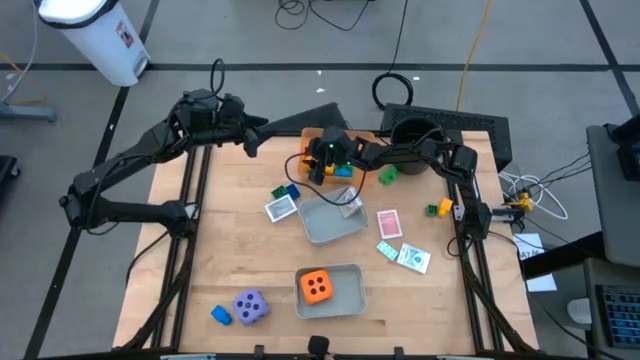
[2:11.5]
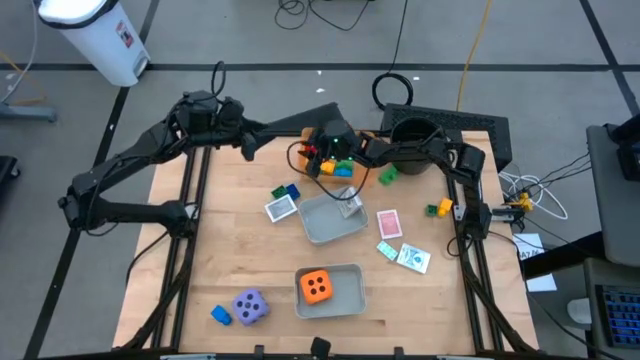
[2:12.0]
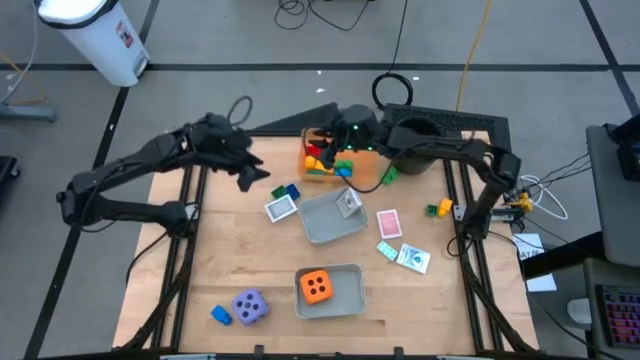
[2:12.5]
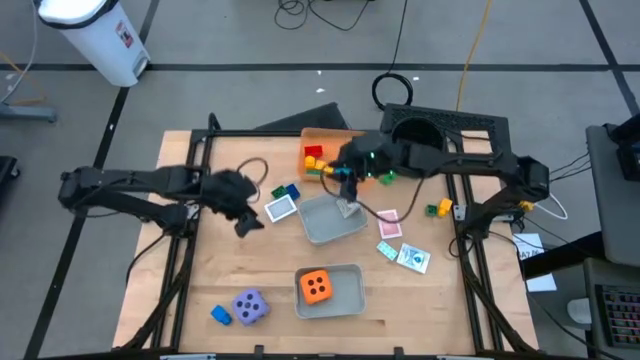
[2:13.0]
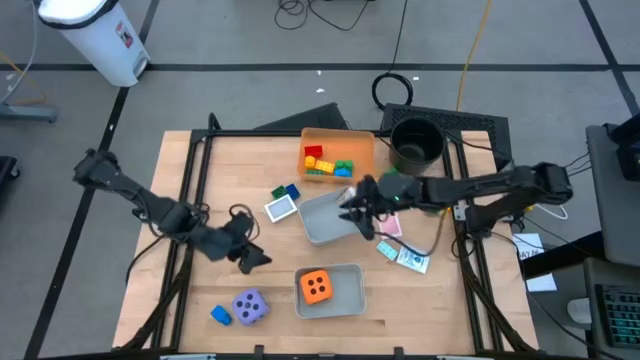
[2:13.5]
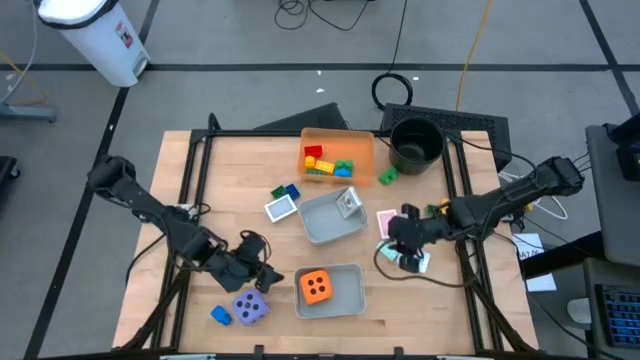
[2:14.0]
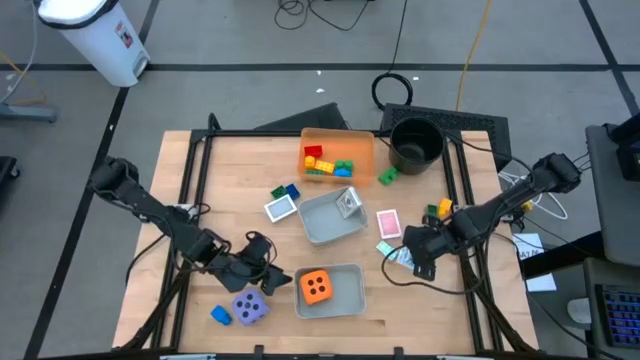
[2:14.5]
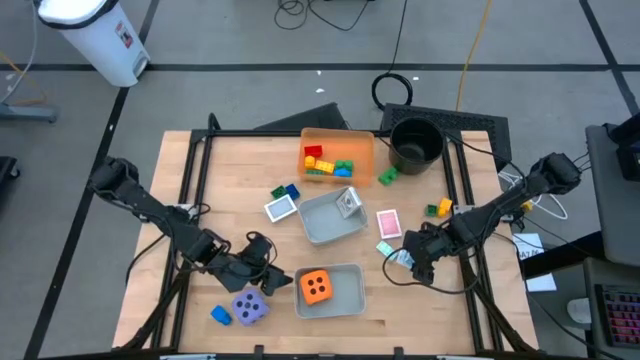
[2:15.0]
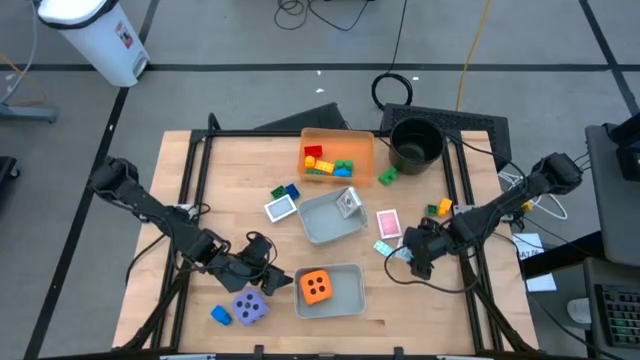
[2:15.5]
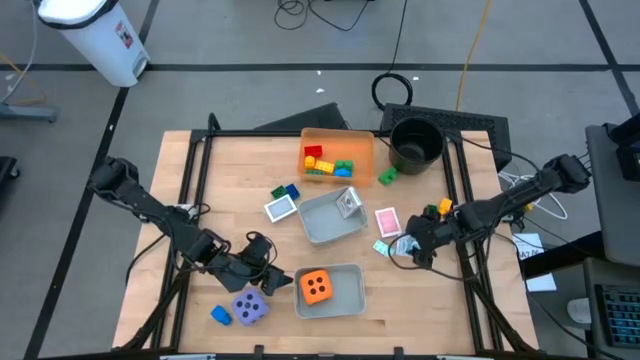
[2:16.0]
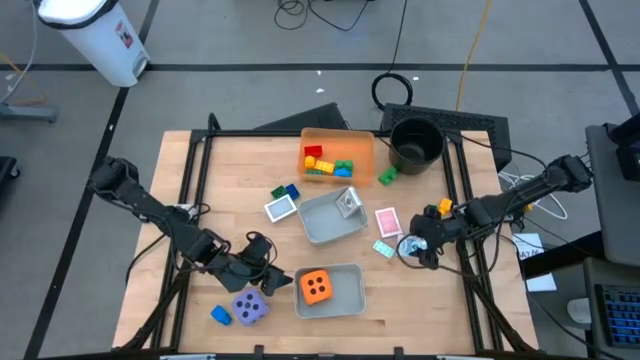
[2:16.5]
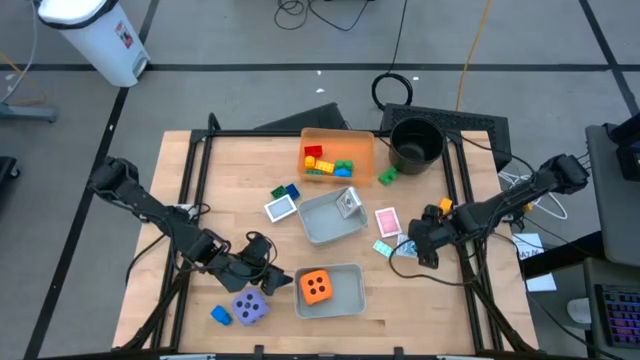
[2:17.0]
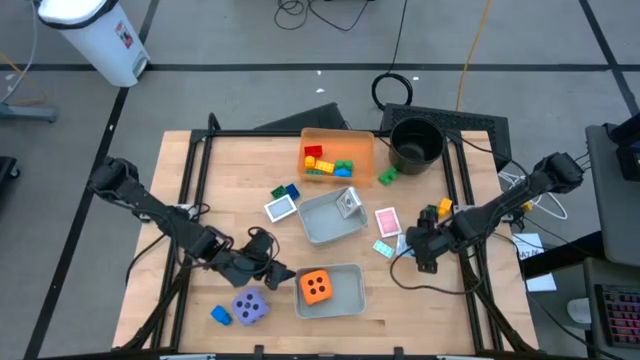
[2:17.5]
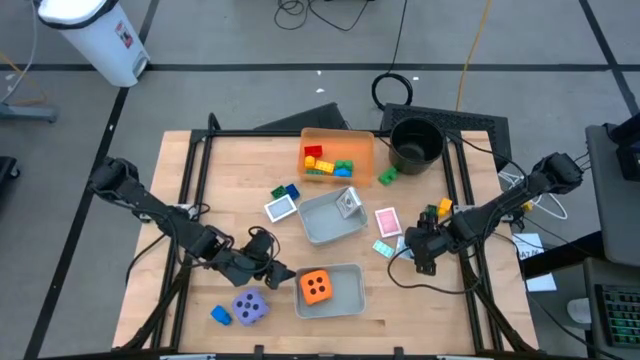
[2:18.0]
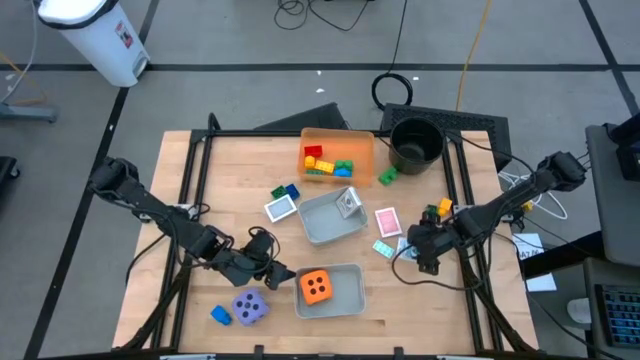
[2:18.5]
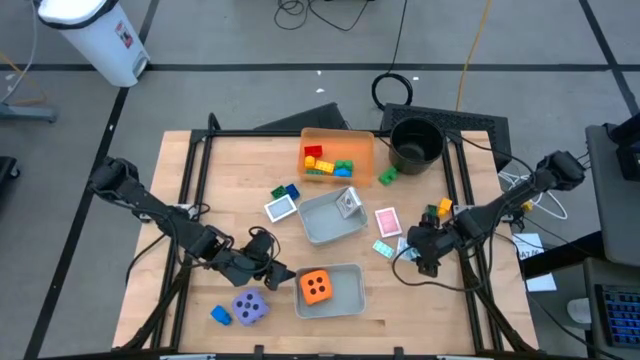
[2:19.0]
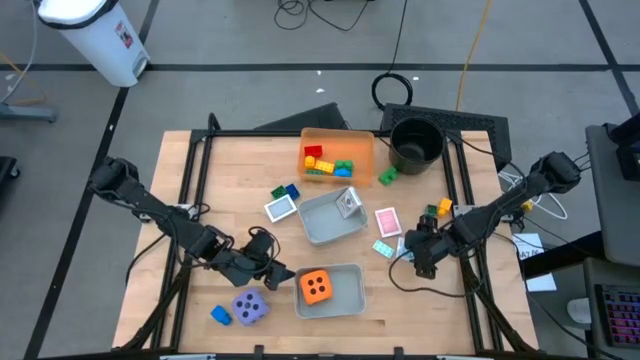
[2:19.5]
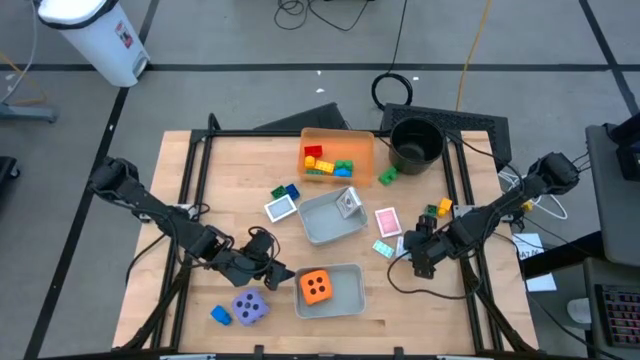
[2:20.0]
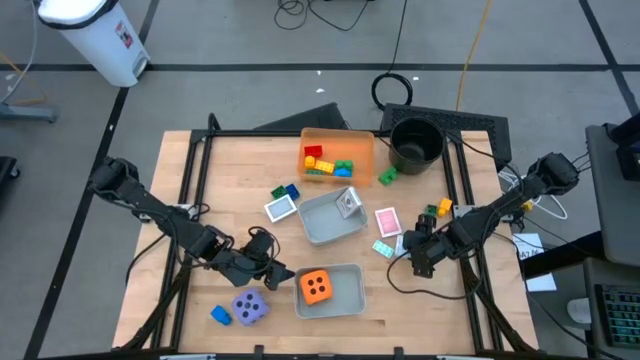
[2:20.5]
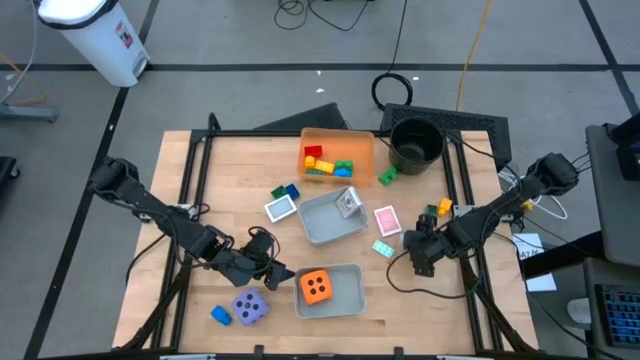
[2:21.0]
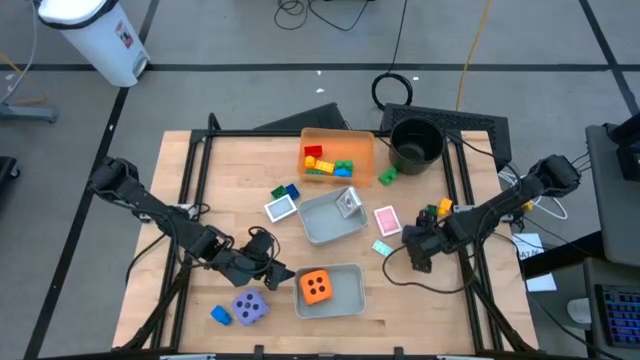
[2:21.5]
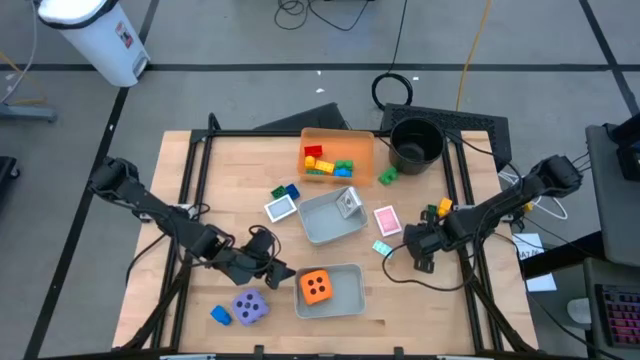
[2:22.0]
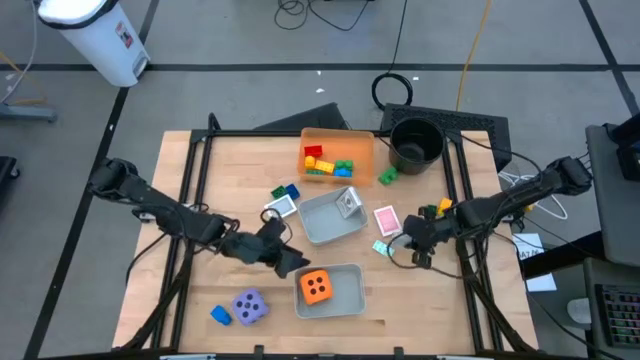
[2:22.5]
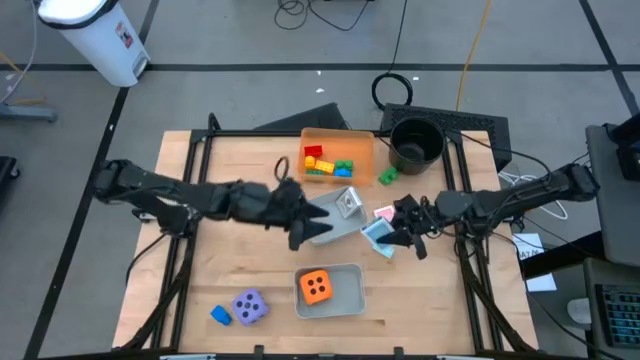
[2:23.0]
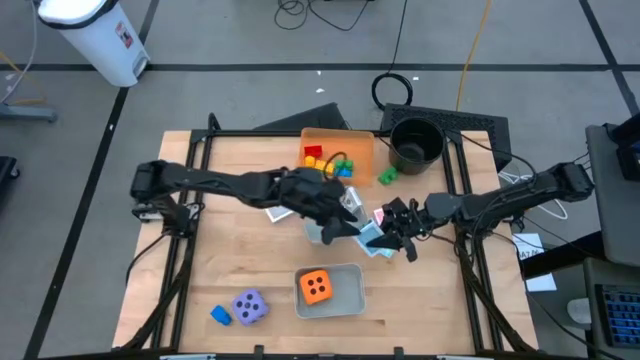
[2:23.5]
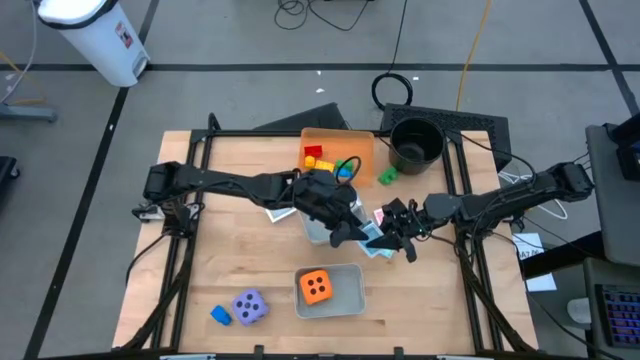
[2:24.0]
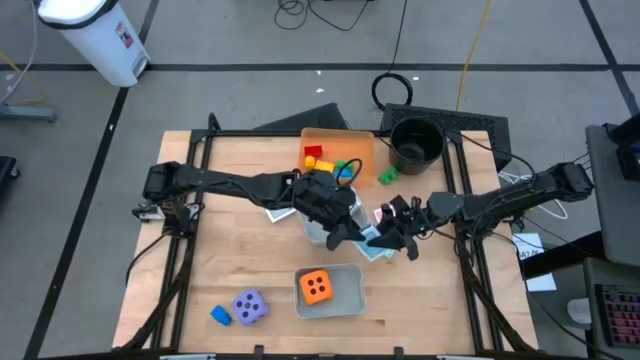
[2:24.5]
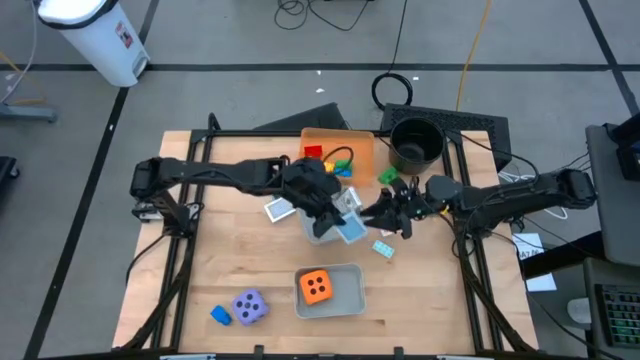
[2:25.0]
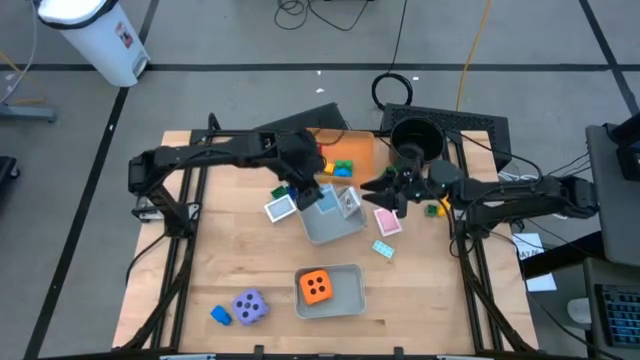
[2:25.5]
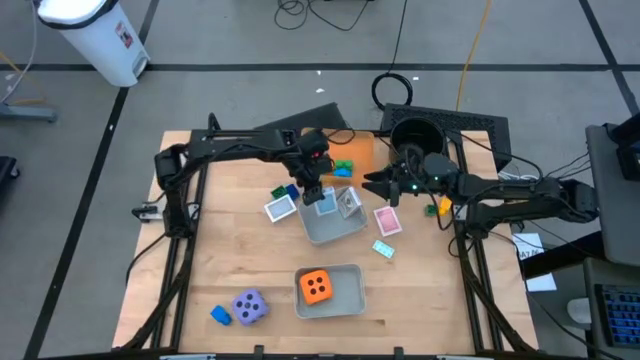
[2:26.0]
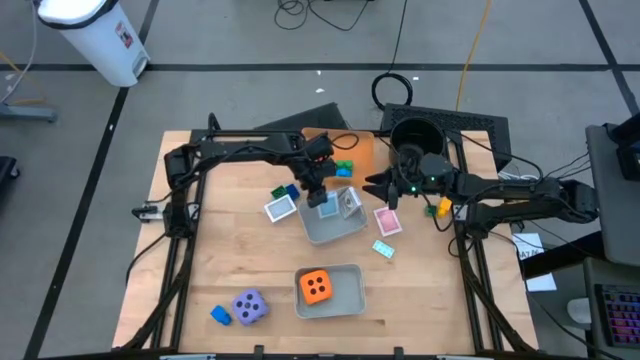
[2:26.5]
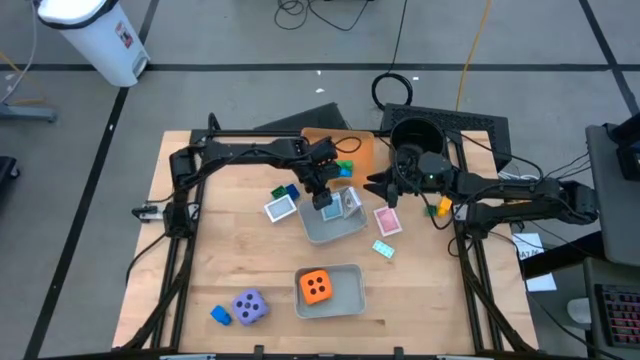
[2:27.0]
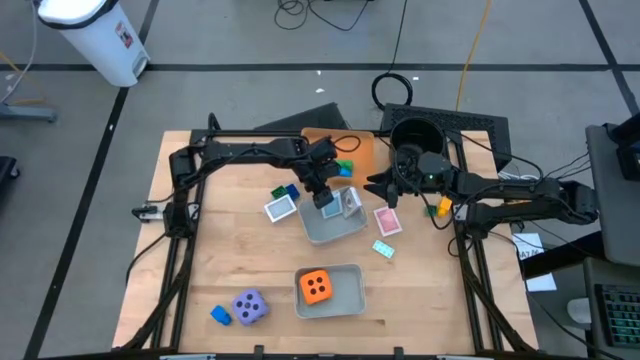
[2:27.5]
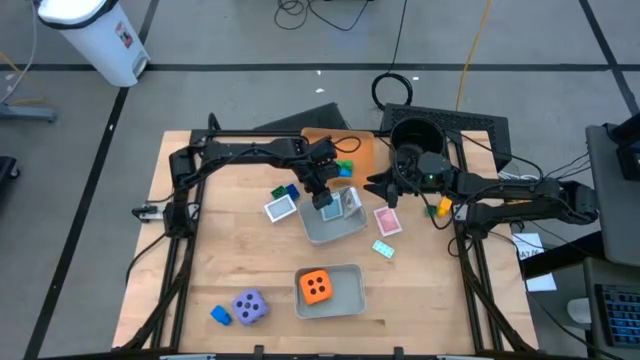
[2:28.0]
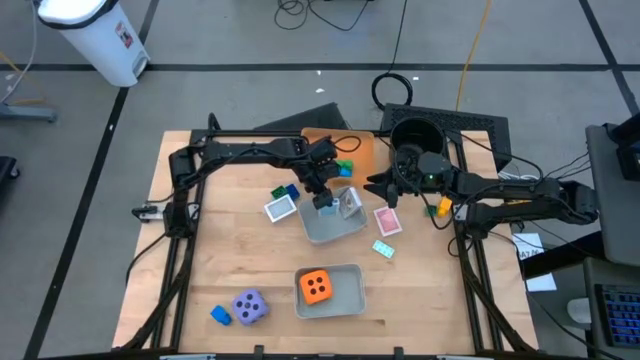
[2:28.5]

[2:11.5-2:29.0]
Task: Pick & Place Toys
Put the blue deck of cards into the top gray bin

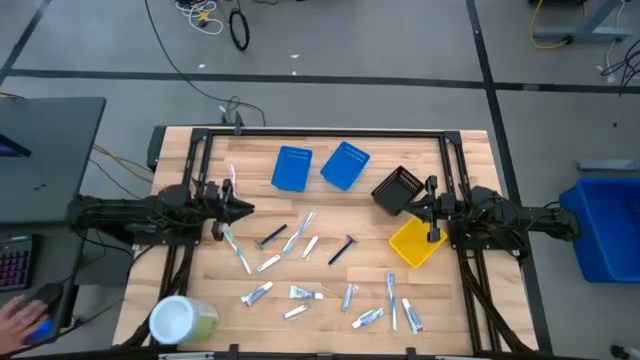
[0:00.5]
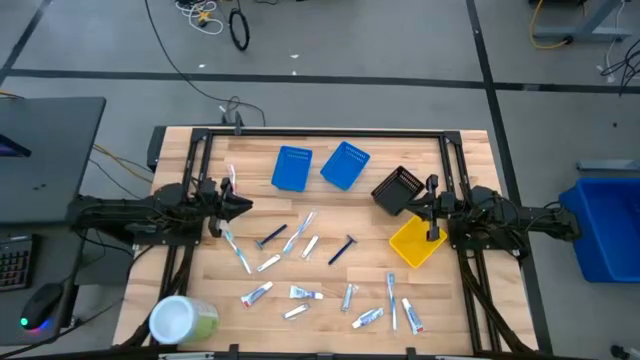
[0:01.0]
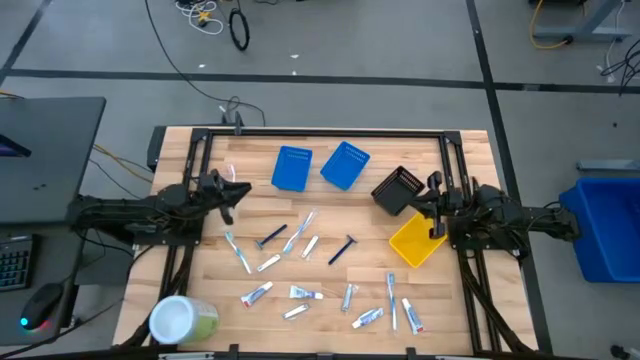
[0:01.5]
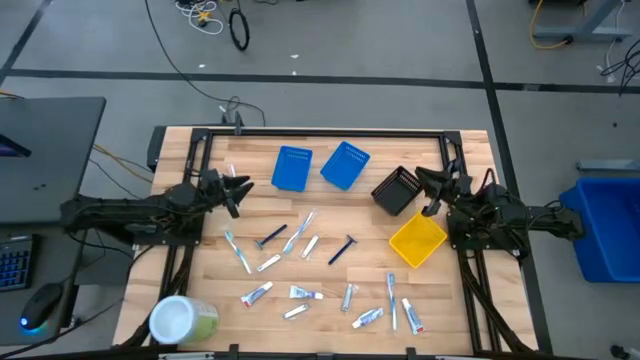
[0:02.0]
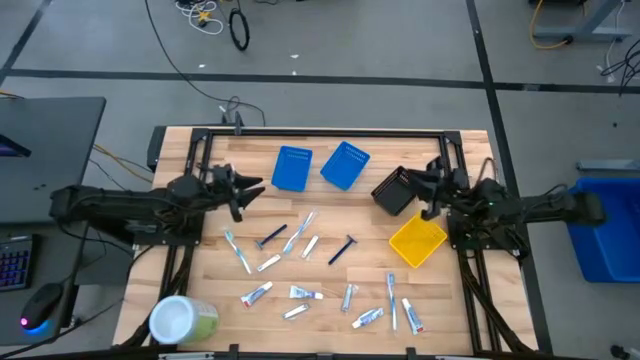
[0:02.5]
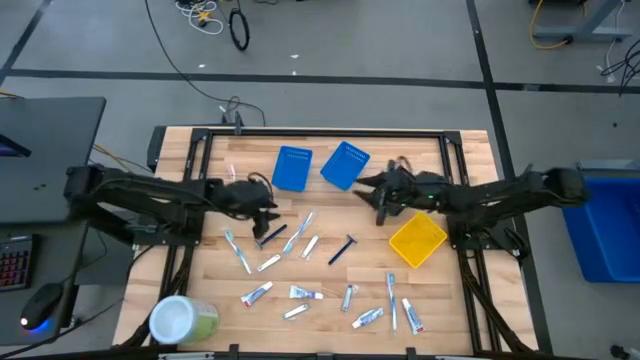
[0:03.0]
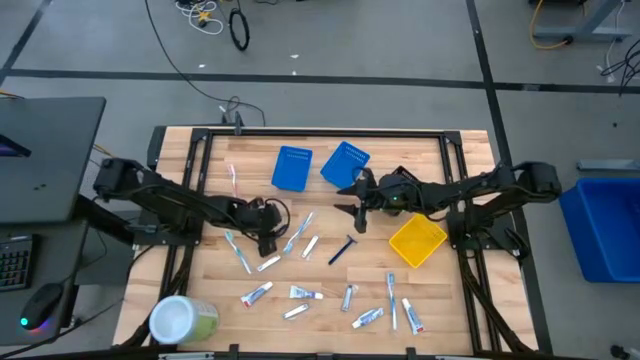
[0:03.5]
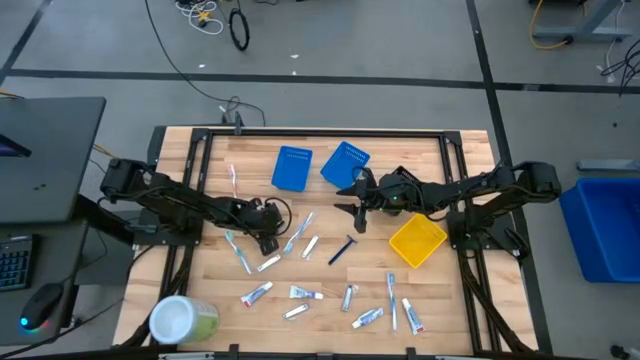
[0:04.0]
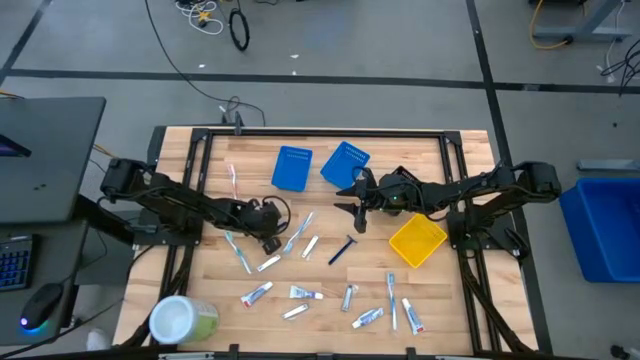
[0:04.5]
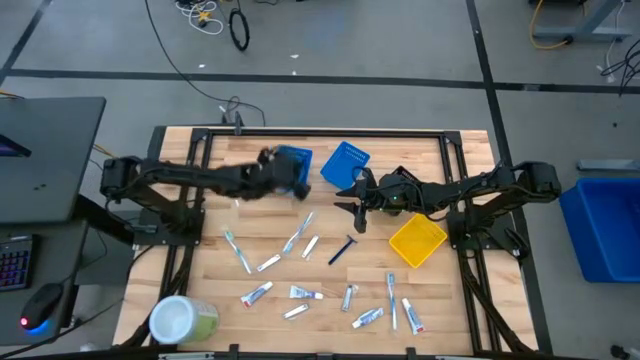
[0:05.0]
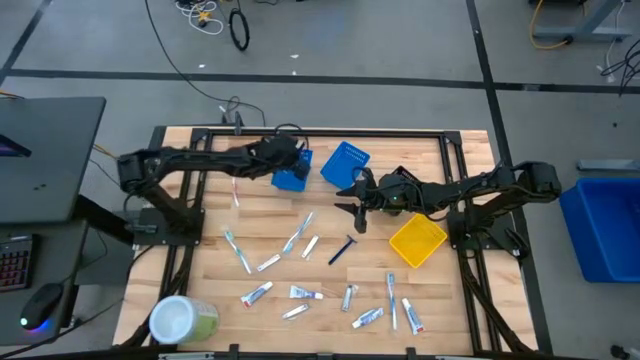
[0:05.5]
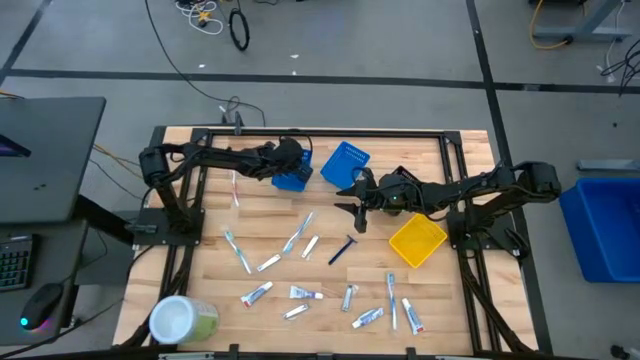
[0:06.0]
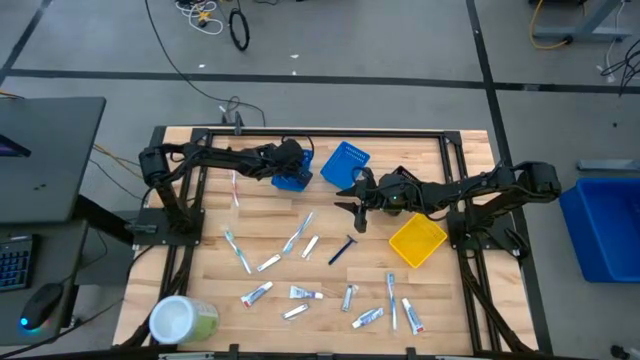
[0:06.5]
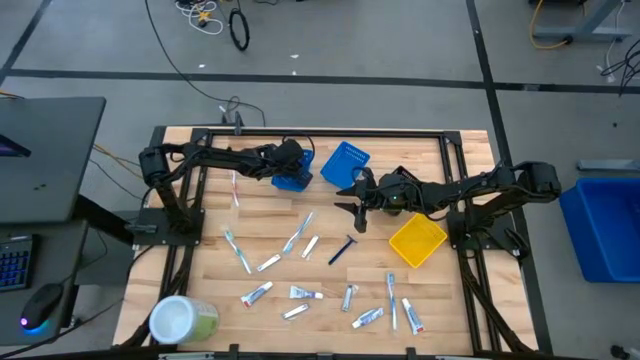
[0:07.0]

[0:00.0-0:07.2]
Task: Pick & Place Travel size toiletries
Put the blue razor into the left blue basket
